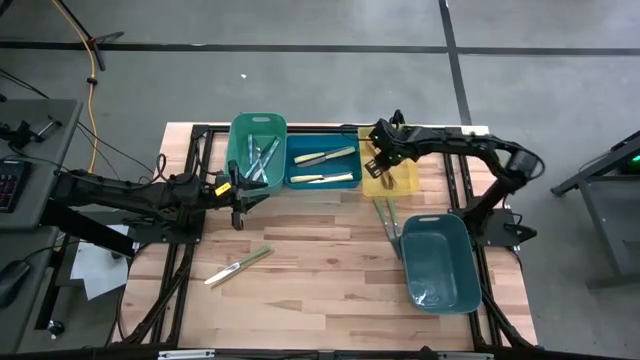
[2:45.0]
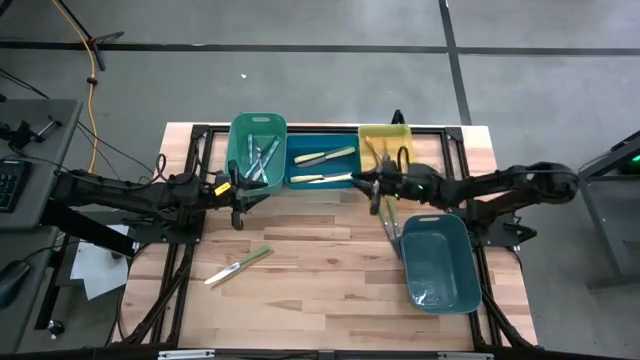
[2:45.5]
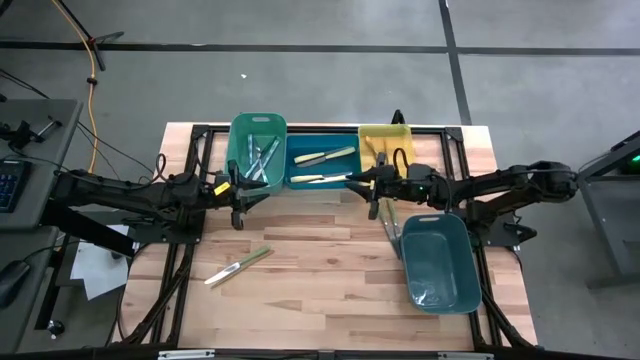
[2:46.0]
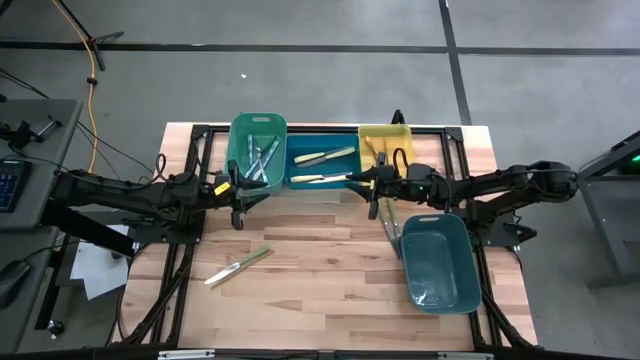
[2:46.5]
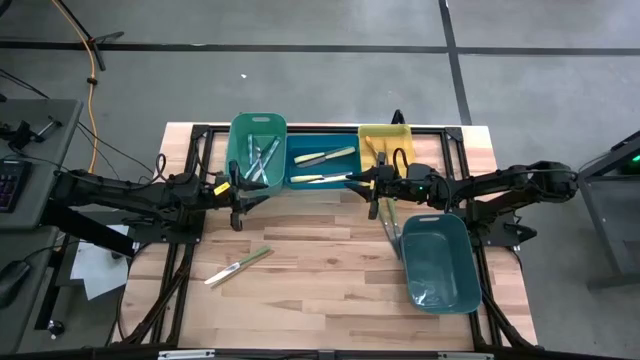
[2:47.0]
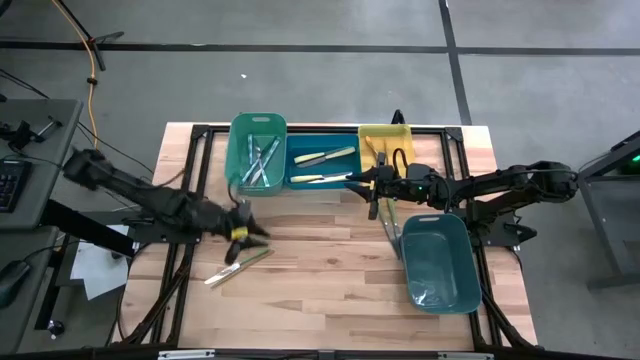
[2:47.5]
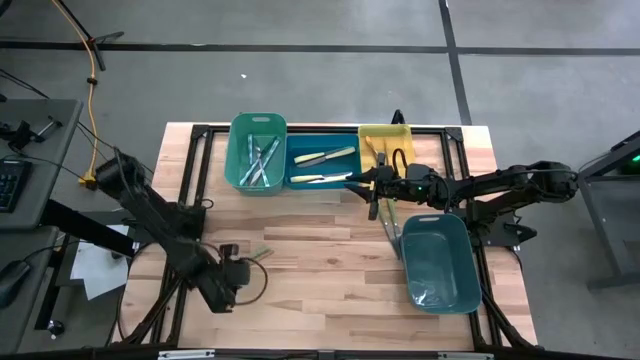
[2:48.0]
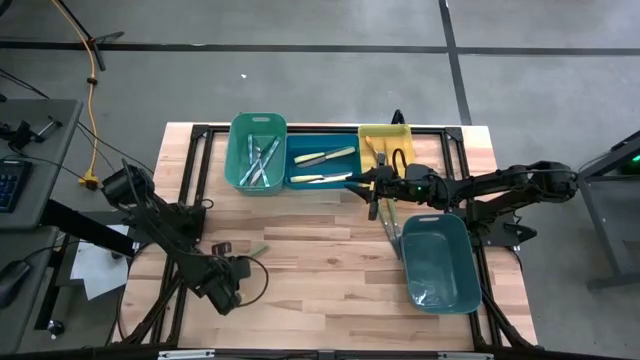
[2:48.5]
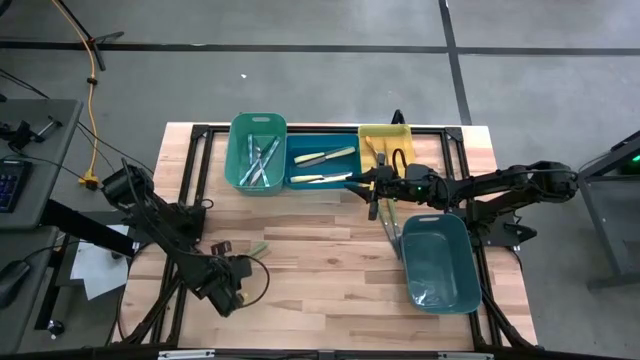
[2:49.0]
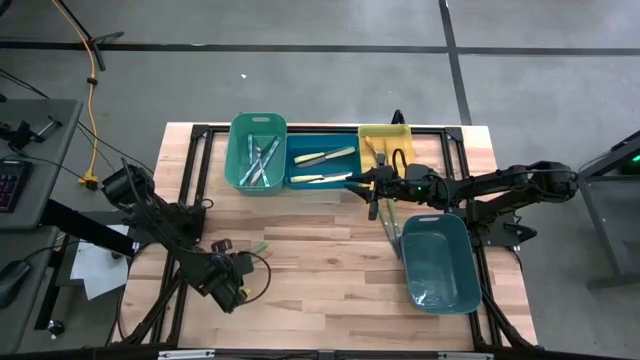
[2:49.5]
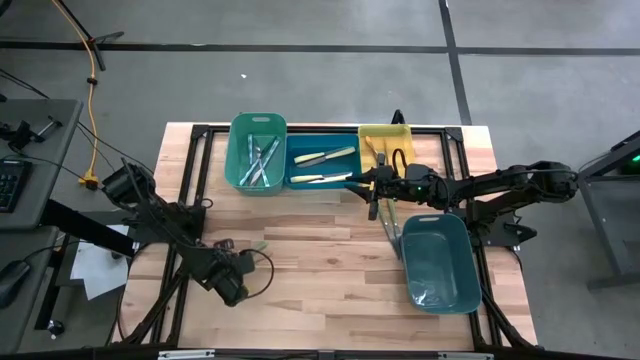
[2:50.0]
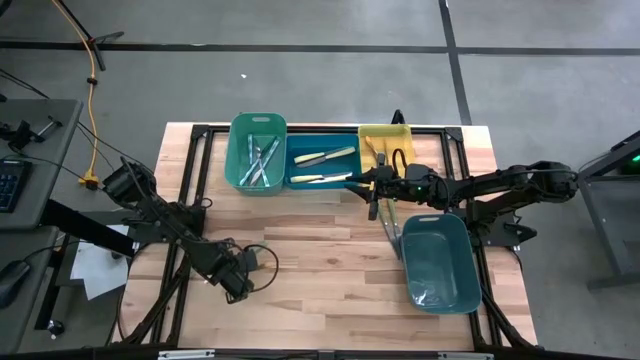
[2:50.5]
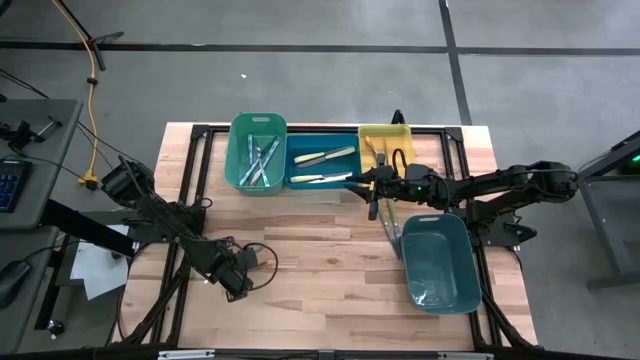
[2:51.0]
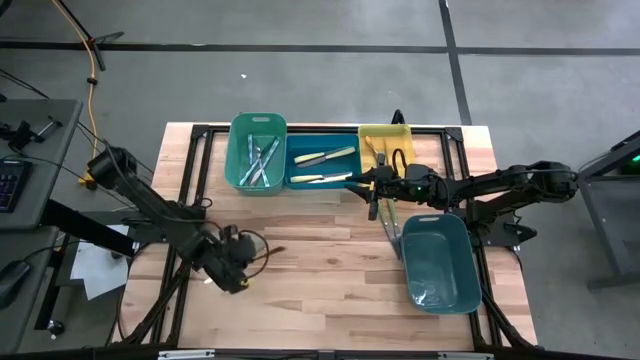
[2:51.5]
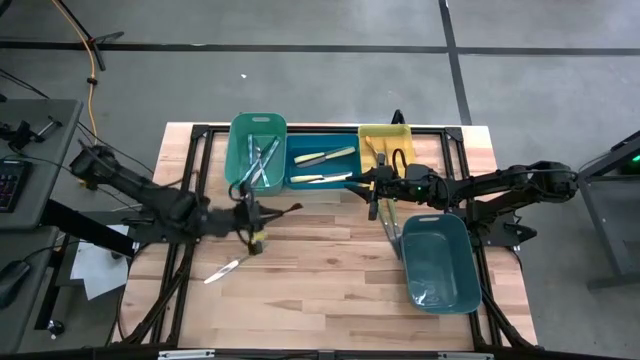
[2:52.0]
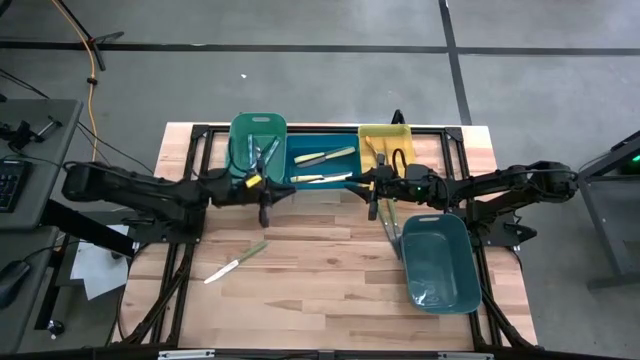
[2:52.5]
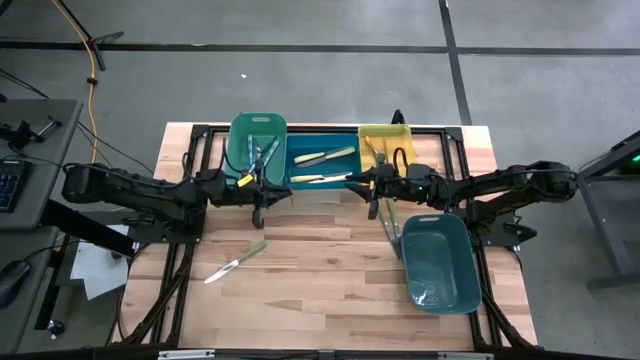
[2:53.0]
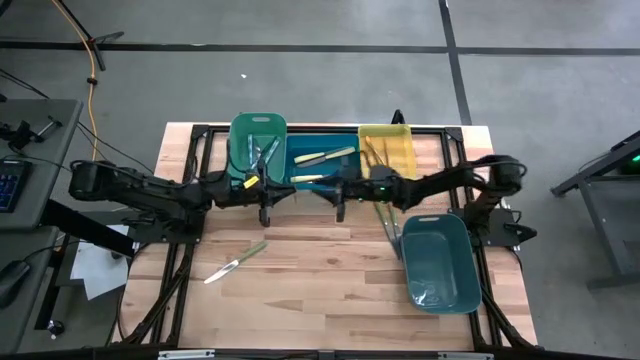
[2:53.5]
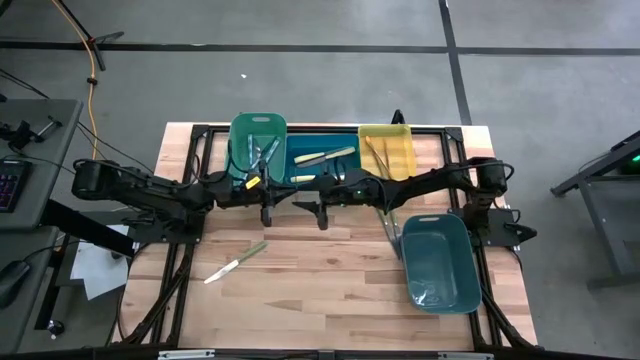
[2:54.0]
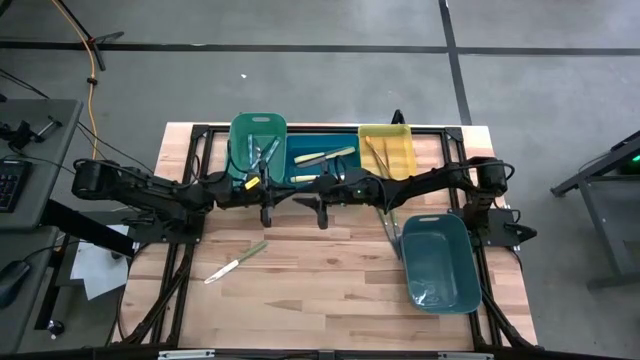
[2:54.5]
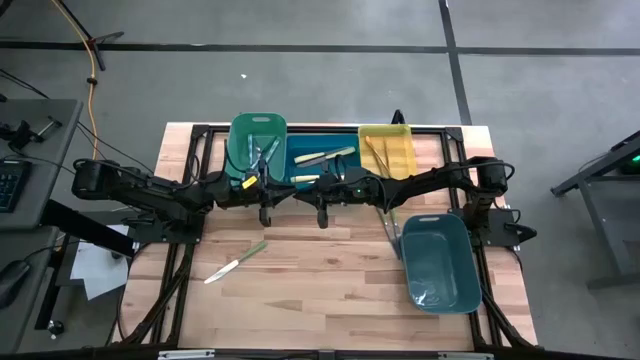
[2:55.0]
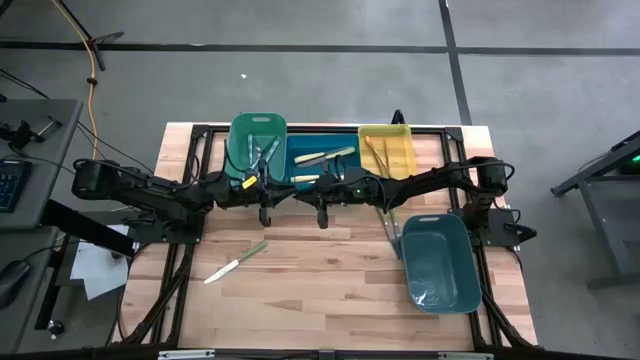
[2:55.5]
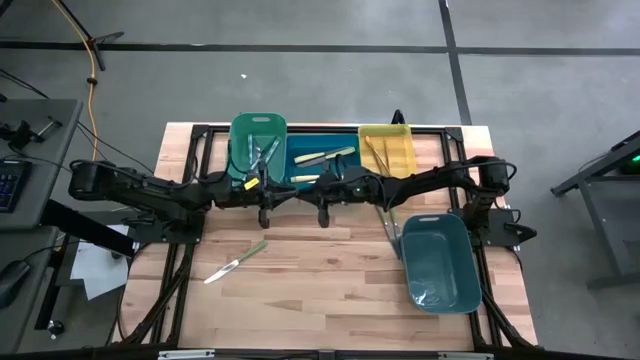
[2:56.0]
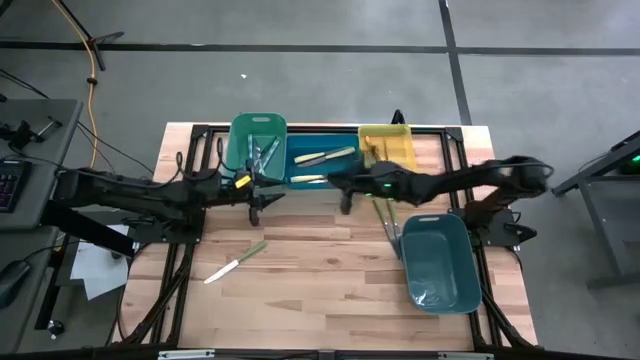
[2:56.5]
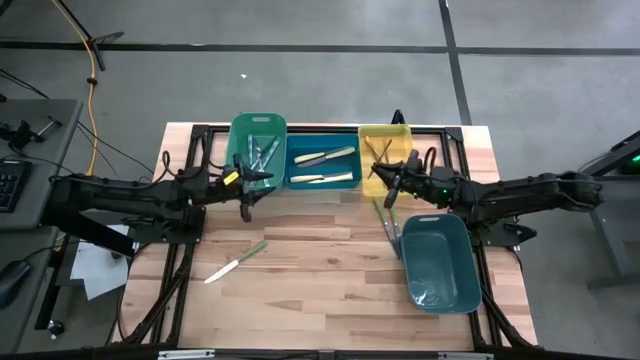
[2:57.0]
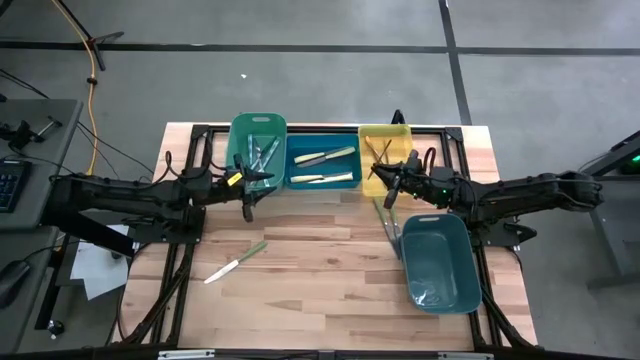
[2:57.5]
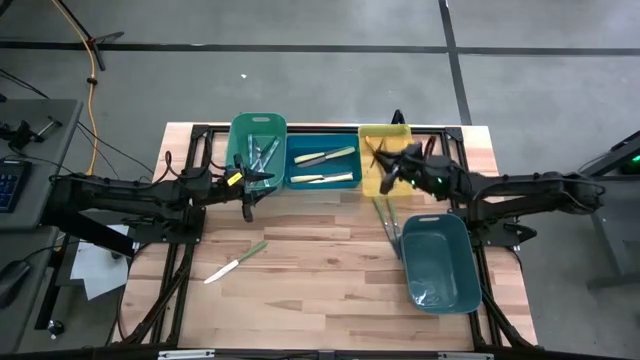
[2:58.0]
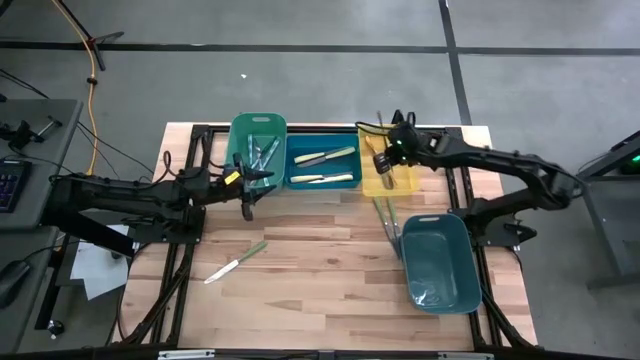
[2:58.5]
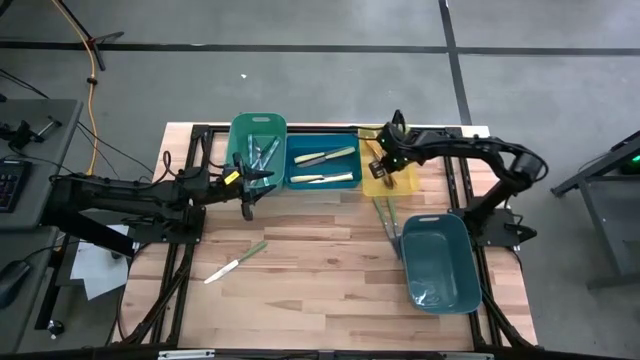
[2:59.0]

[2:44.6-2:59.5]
Task: Sort silverware by color (type)
Put the gold knife into the yellow bin

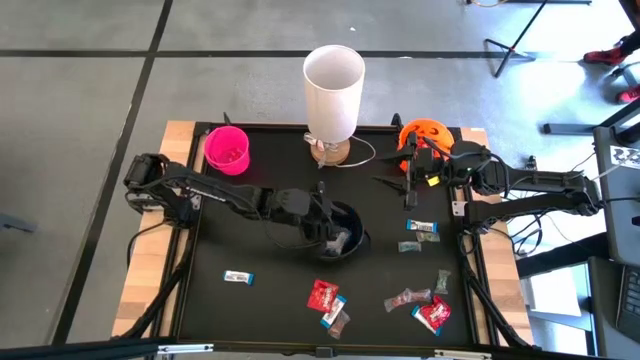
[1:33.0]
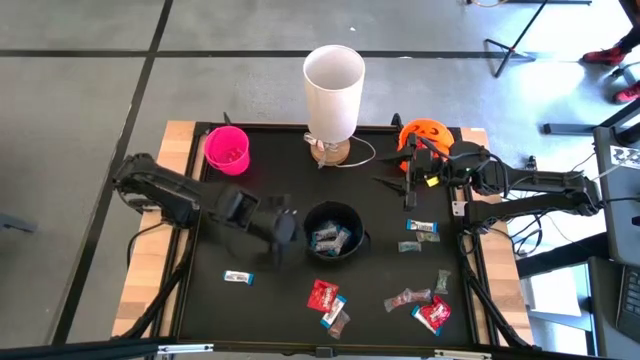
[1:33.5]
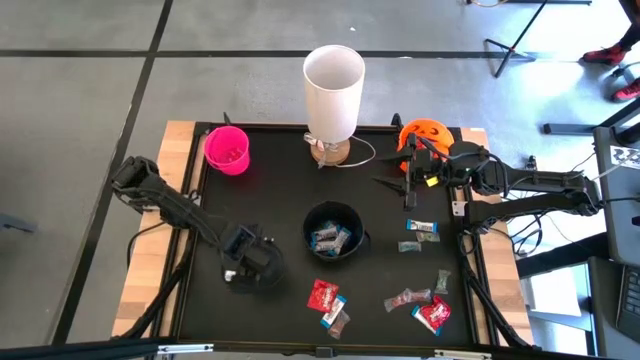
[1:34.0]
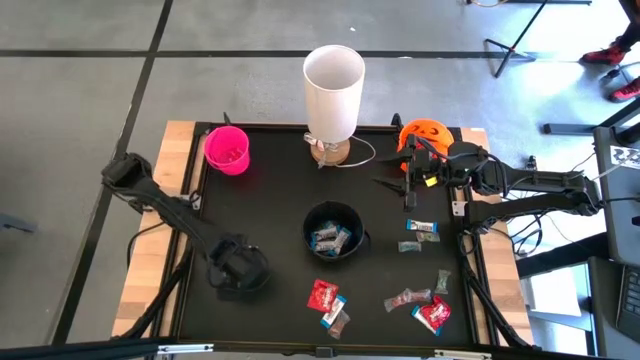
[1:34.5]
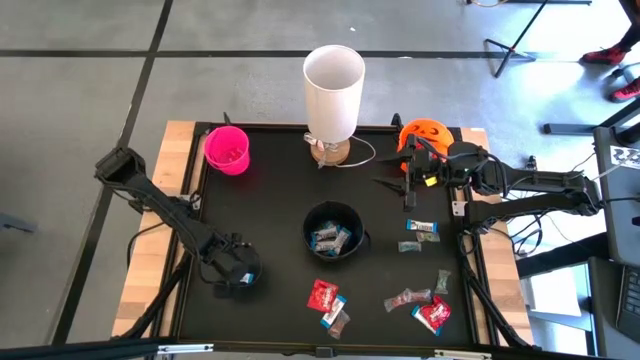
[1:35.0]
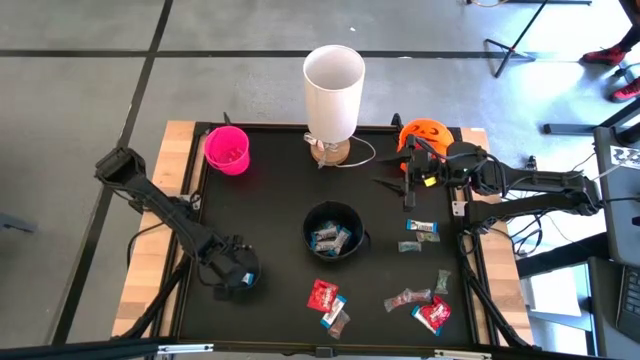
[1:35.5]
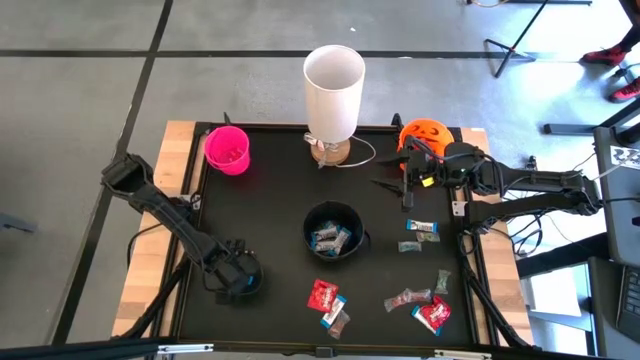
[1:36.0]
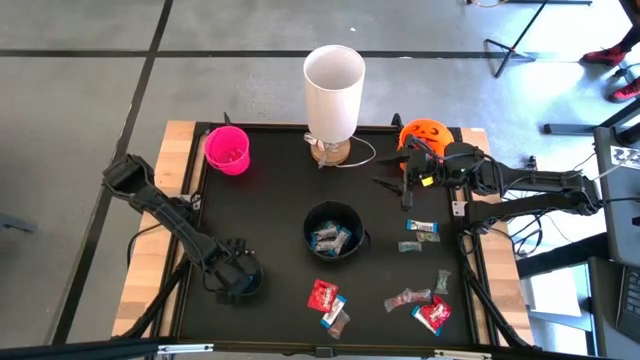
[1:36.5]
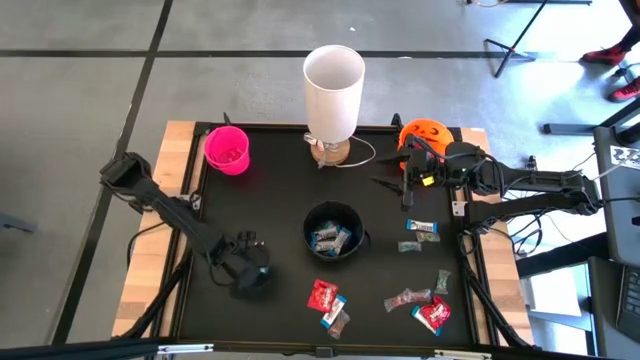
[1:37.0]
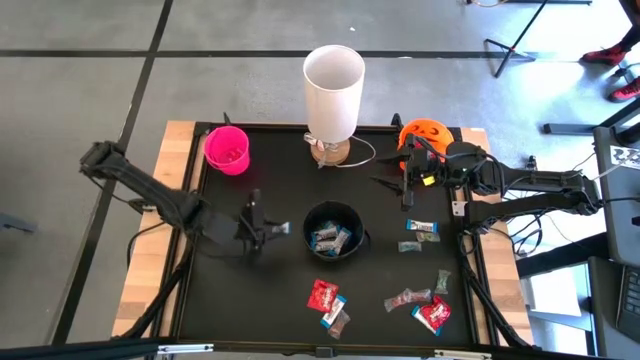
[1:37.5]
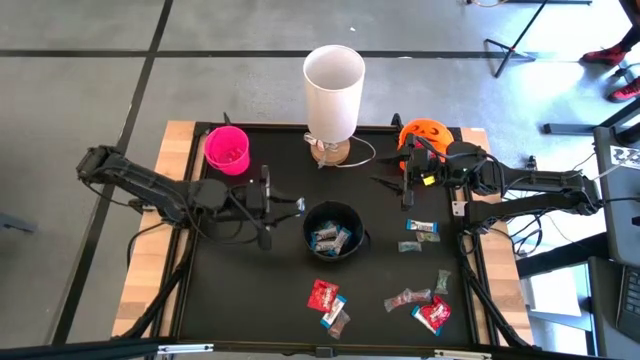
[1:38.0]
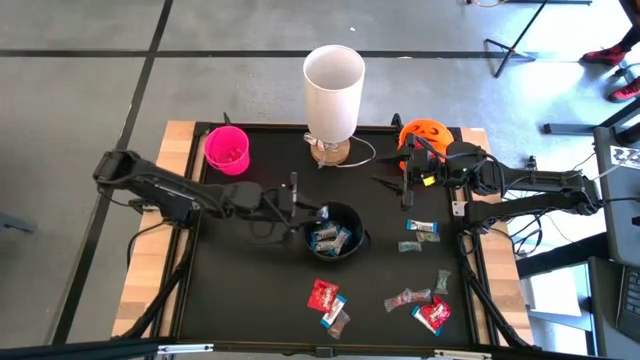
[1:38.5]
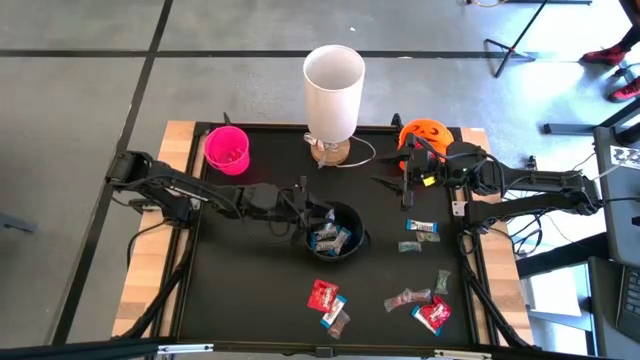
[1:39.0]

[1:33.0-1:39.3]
Task: Sort candy
Put the white chocolate into the black bucket
